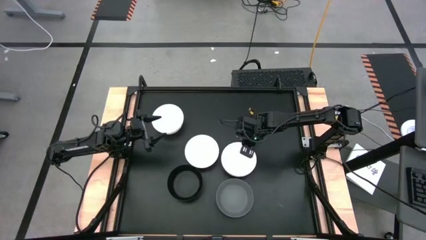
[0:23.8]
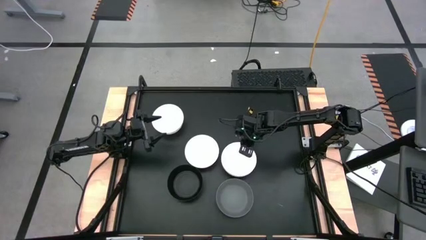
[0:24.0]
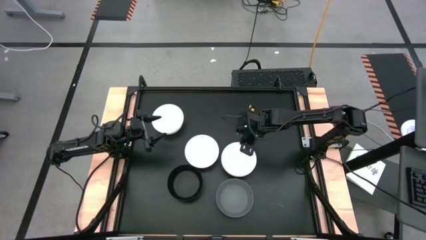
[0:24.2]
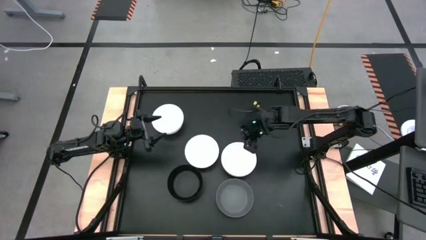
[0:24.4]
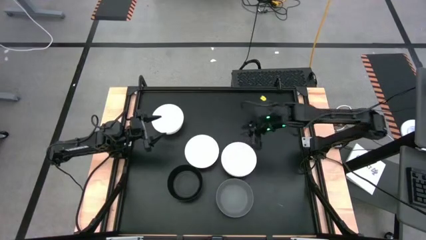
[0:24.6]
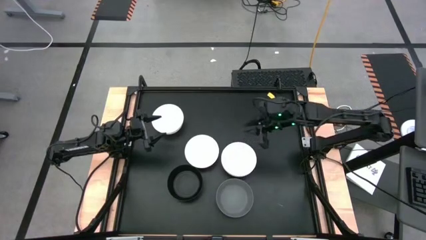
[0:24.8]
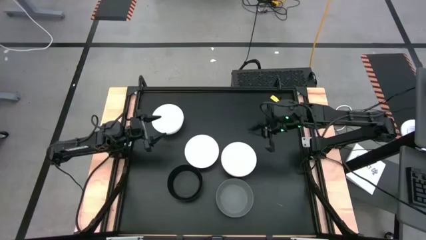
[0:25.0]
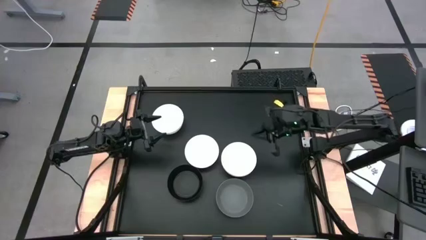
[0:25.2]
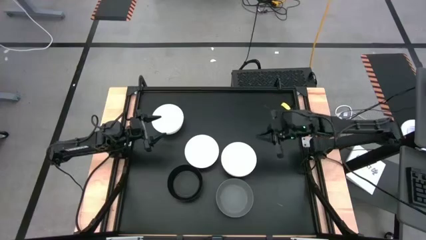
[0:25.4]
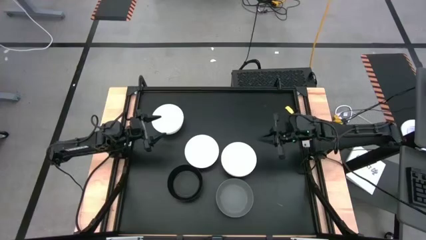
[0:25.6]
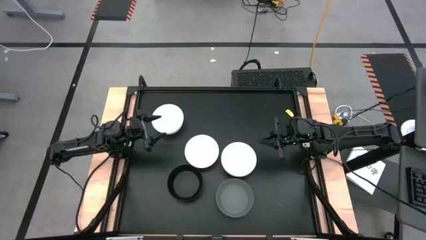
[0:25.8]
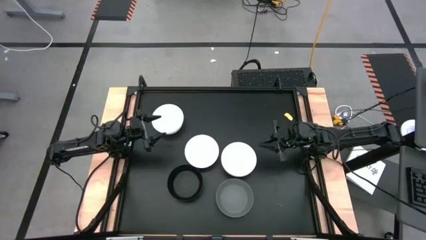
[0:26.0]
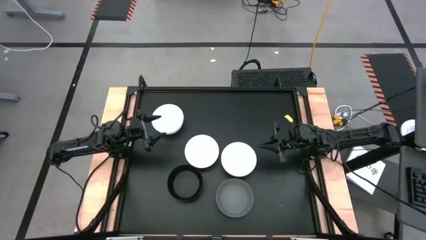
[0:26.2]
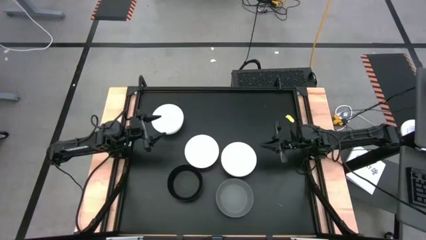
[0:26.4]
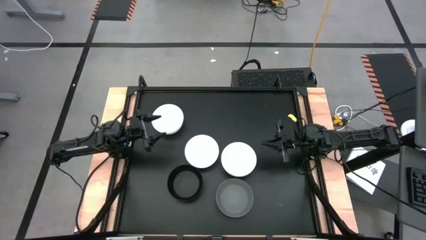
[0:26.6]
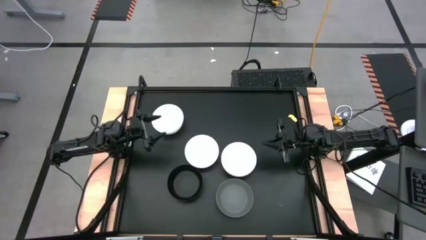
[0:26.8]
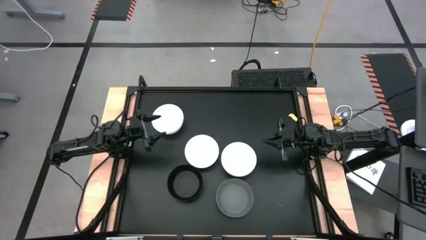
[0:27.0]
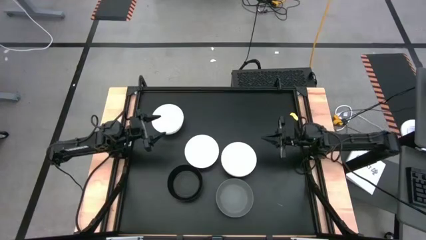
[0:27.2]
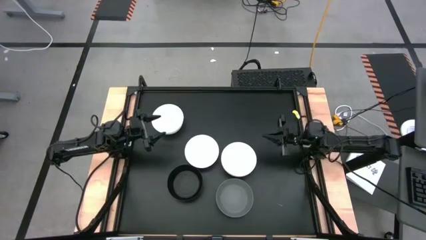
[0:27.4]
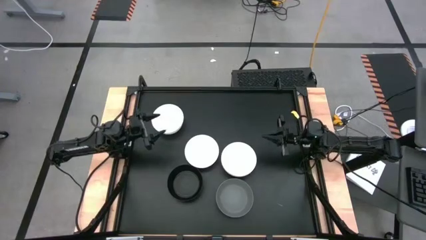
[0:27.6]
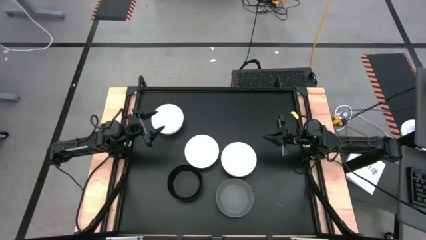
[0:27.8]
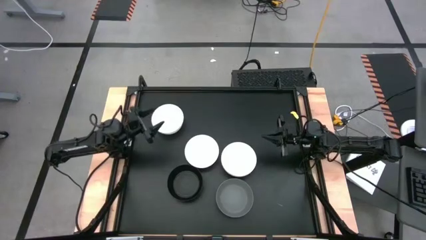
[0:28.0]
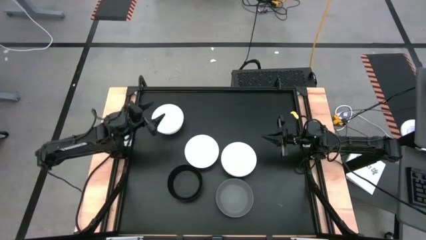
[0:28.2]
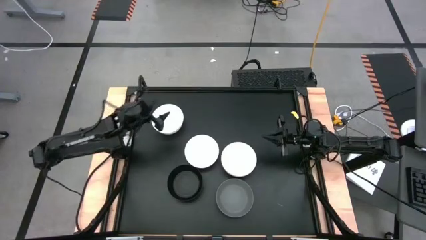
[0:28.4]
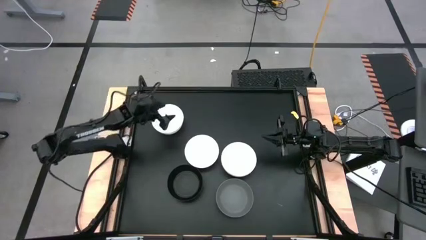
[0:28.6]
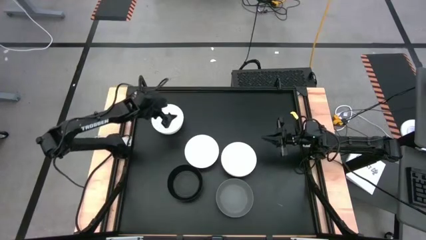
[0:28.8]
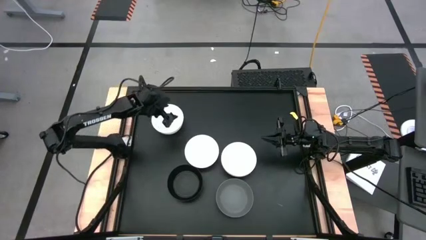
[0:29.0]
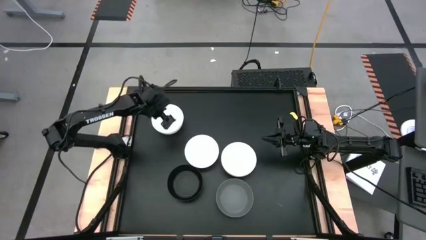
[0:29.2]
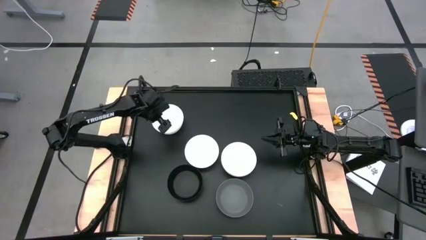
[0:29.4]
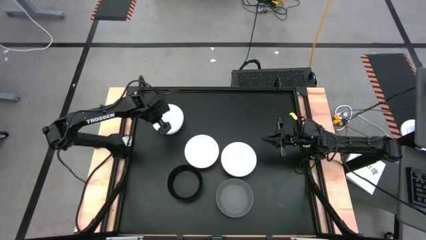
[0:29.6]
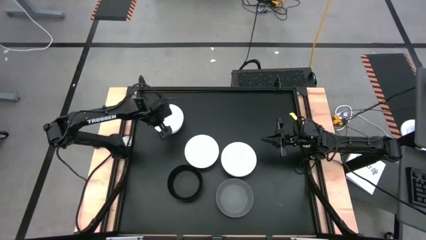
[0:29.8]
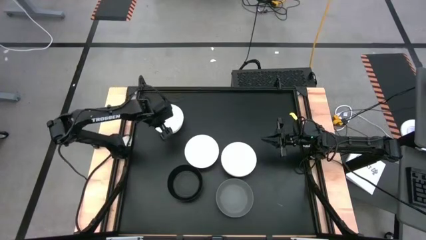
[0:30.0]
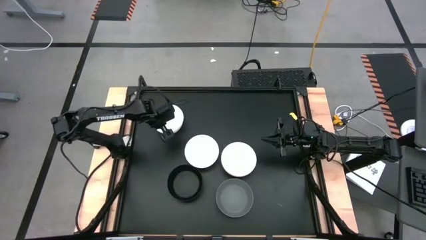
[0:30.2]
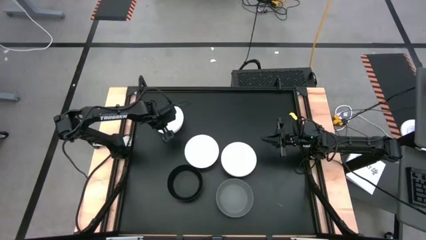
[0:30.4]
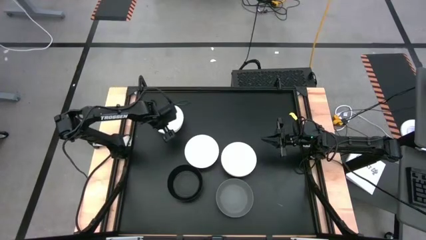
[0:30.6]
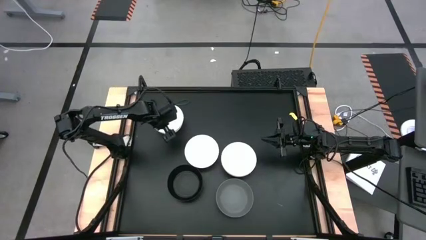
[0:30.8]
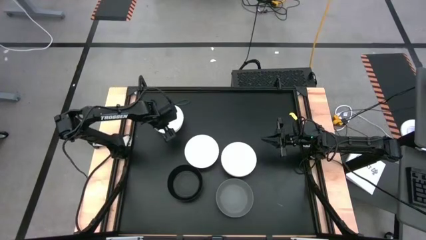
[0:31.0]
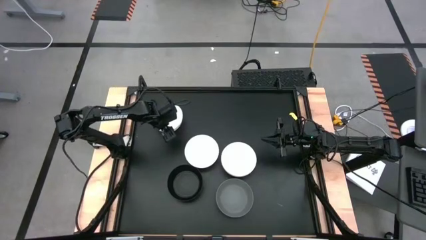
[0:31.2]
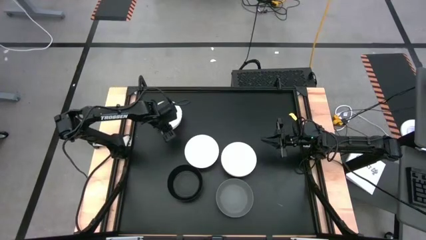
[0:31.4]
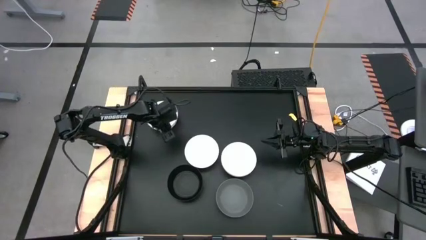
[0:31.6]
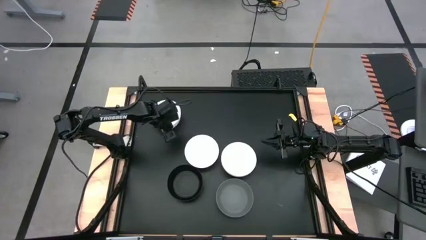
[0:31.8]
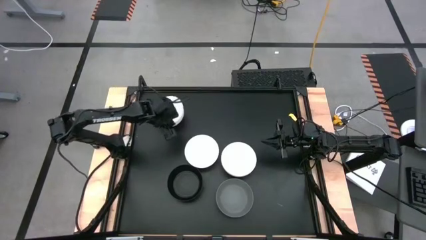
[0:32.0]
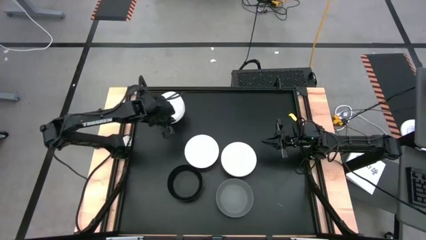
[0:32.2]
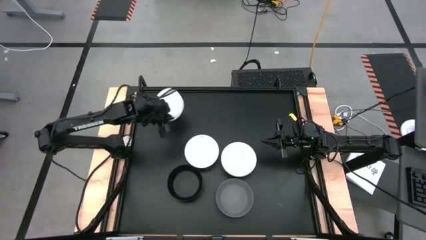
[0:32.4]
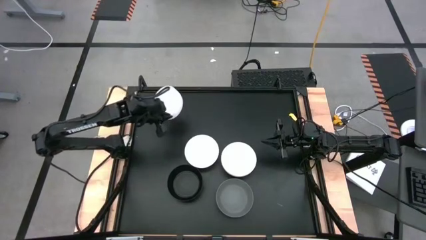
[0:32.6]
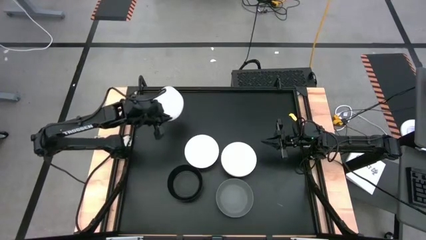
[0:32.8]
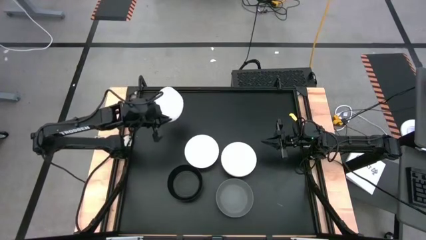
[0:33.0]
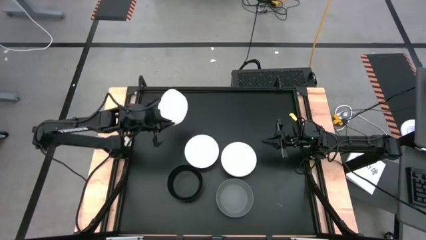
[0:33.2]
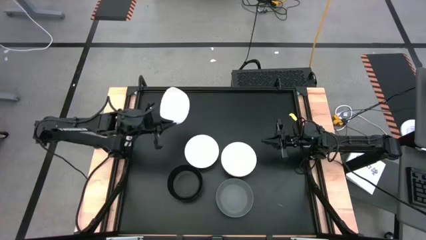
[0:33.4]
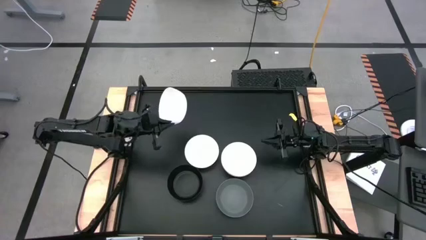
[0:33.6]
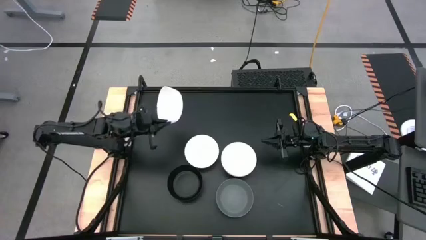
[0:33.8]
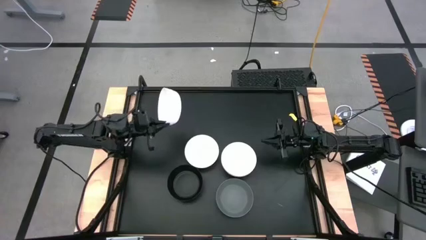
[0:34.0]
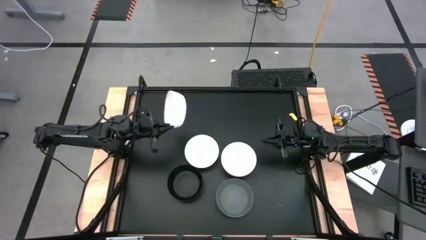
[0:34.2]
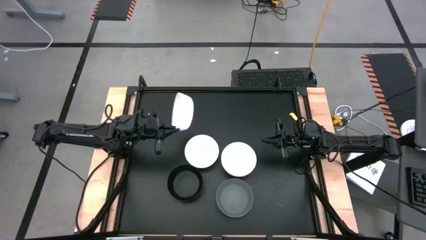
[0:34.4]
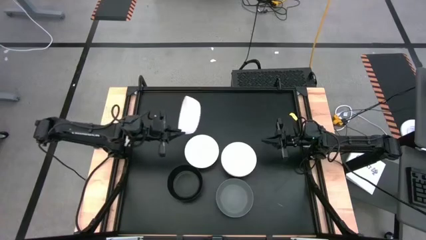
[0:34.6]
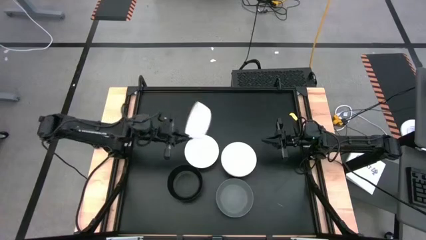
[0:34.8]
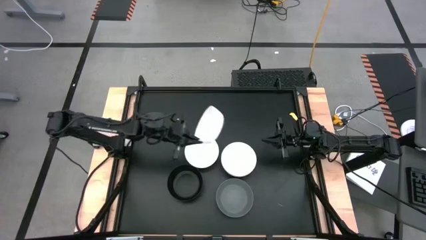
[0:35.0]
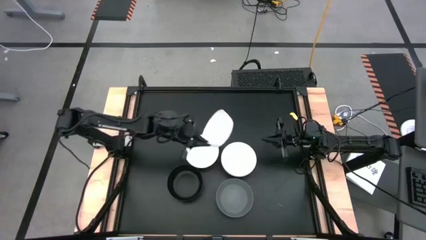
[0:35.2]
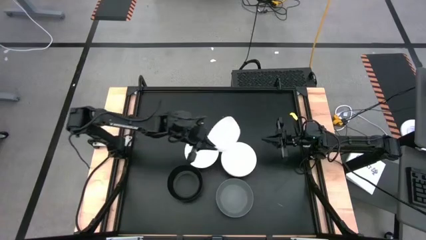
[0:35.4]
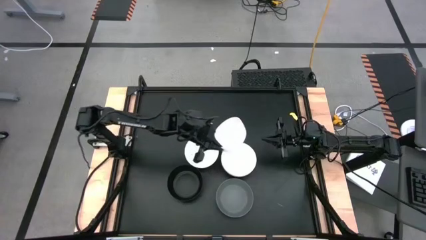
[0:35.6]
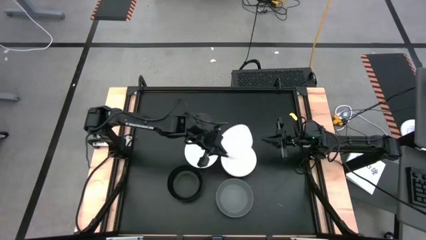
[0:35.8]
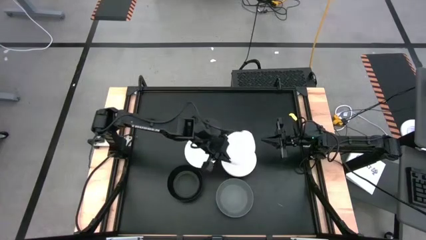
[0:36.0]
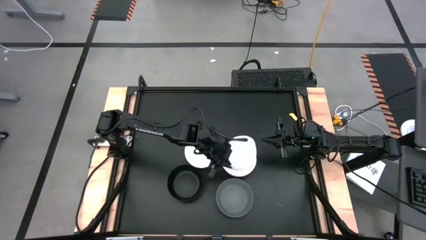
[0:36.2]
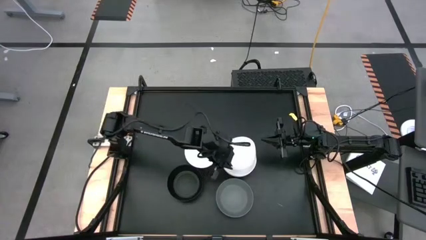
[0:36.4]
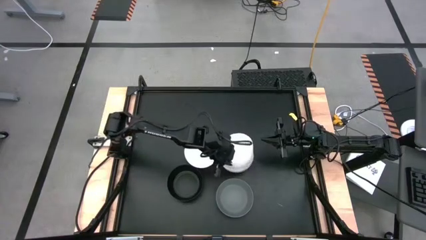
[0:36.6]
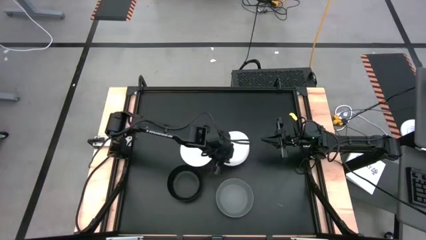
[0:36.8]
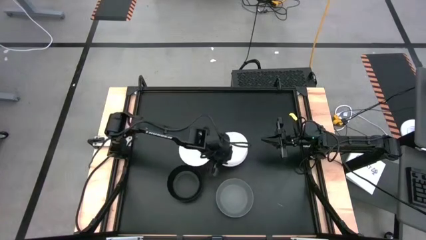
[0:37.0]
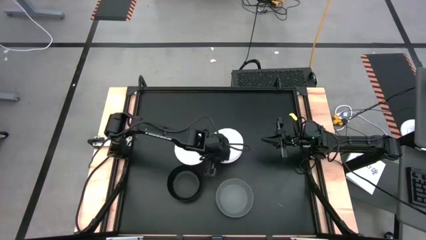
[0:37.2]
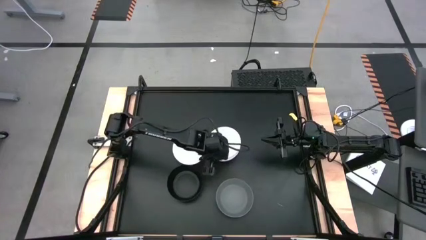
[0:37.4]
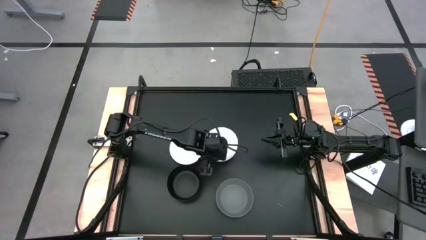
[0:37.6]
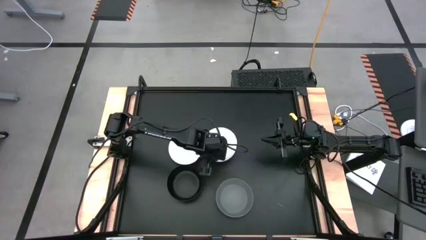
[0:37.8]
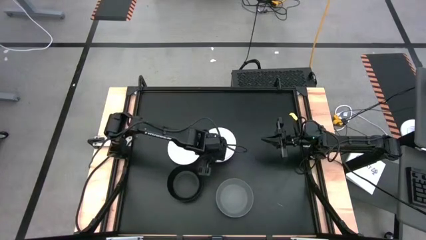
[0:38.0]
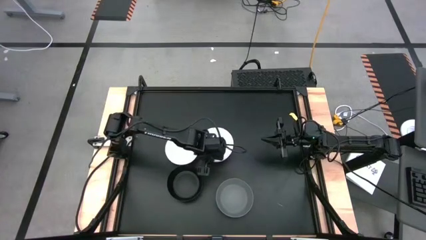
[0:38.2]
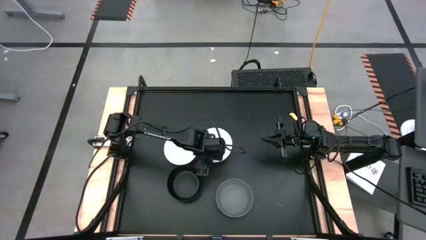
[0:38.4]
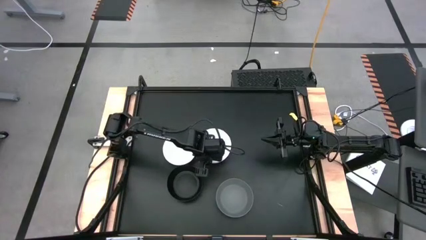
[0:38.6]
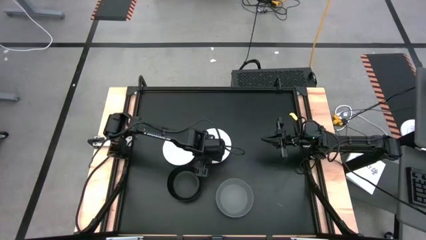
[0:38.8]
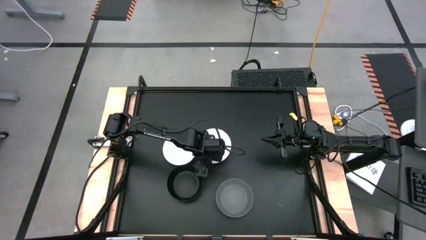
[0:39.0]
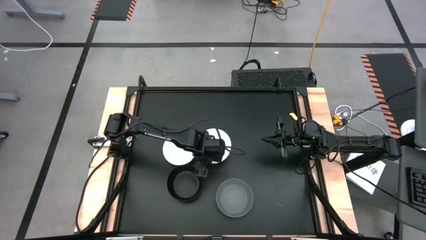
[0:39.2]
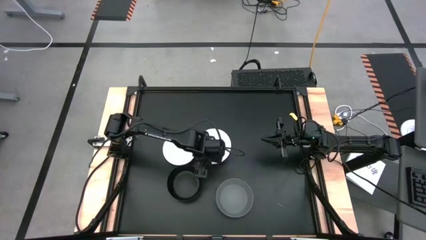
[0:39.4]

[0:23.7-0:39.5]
Task: Nest bowls inside each other
Stack the top left white bowl into the white bowl
